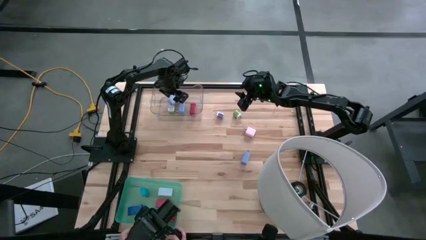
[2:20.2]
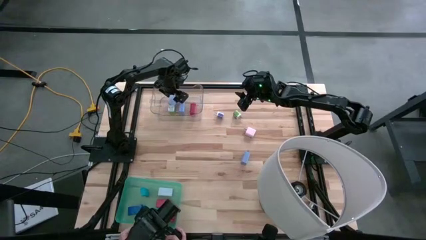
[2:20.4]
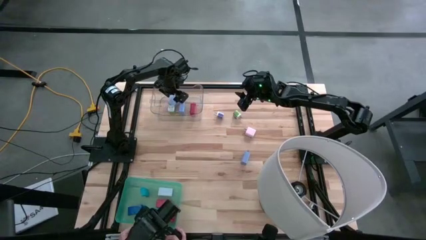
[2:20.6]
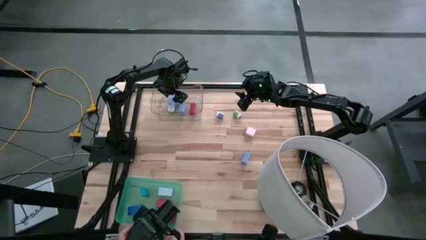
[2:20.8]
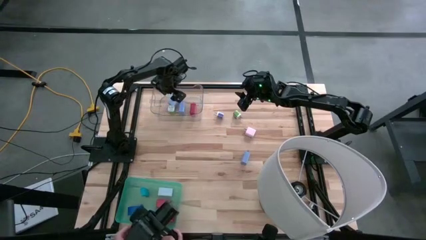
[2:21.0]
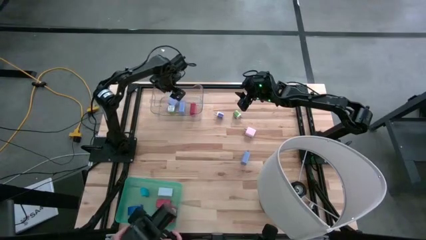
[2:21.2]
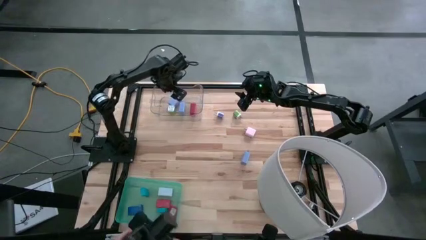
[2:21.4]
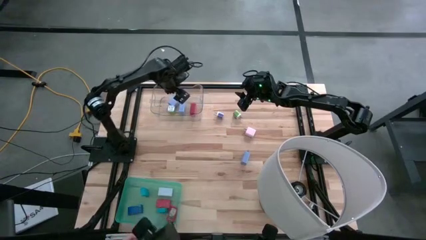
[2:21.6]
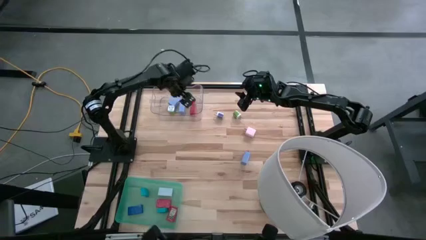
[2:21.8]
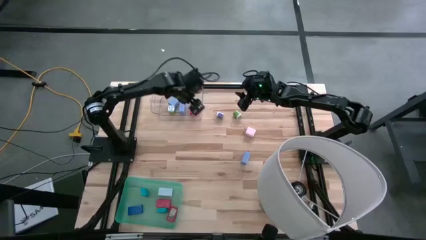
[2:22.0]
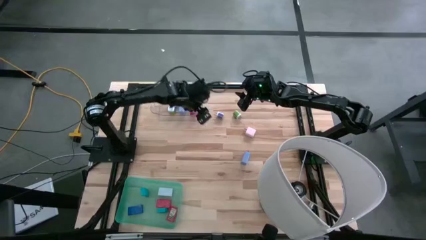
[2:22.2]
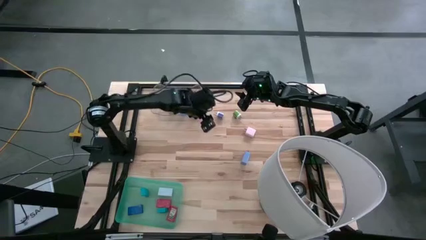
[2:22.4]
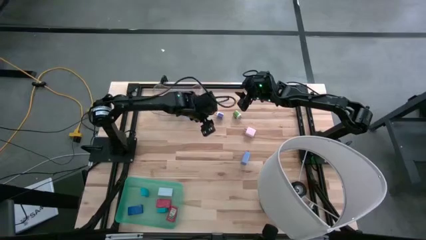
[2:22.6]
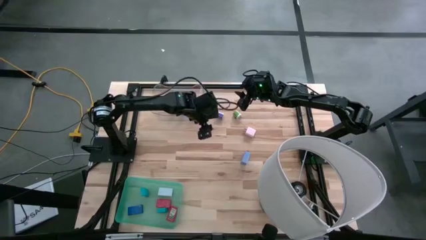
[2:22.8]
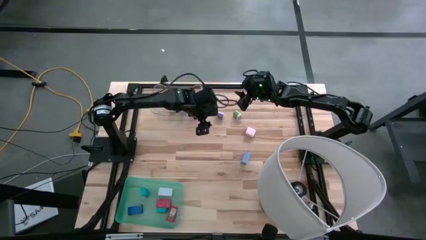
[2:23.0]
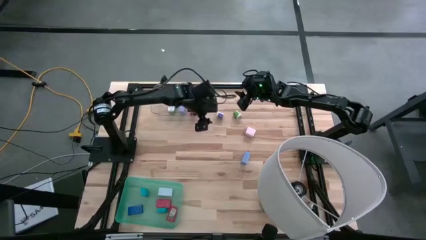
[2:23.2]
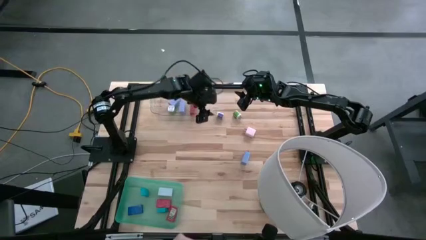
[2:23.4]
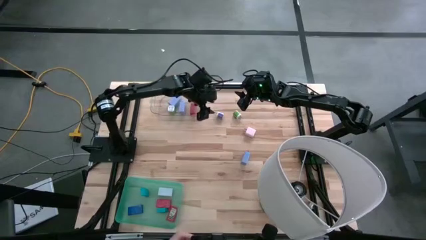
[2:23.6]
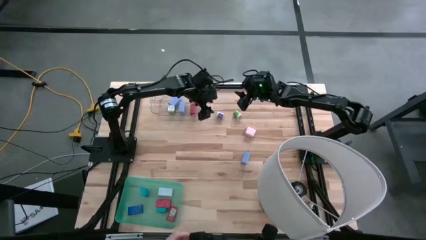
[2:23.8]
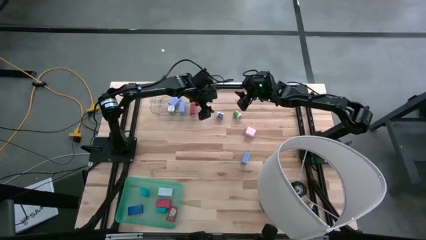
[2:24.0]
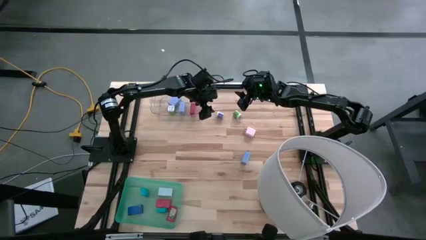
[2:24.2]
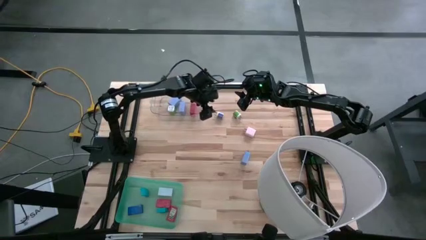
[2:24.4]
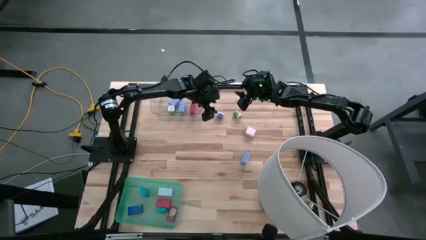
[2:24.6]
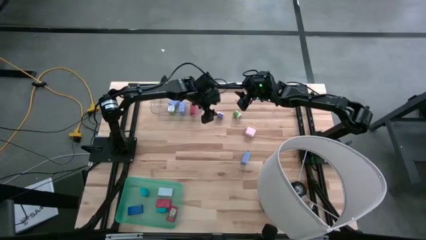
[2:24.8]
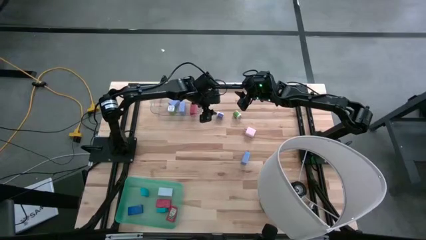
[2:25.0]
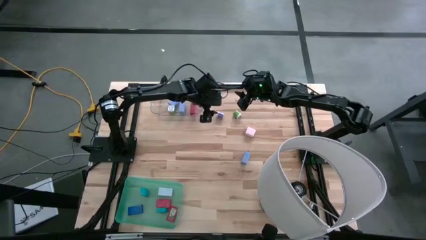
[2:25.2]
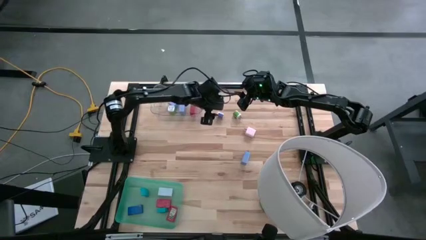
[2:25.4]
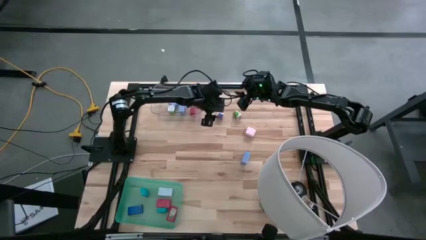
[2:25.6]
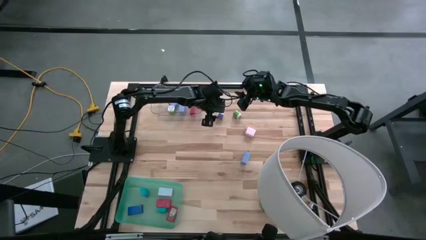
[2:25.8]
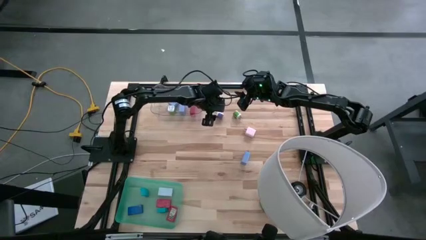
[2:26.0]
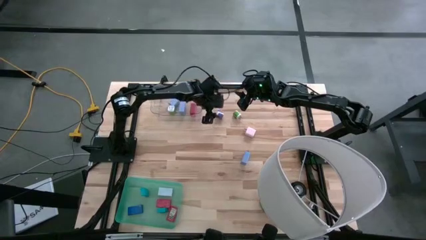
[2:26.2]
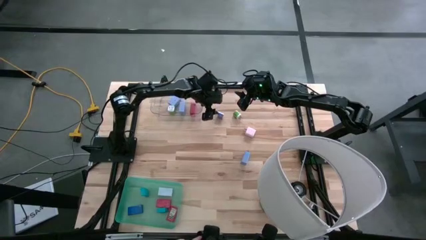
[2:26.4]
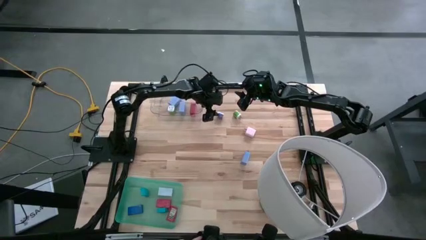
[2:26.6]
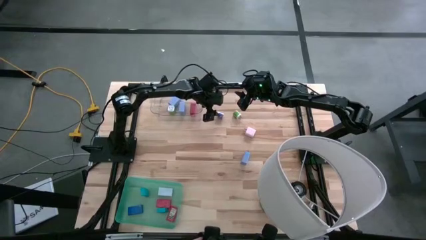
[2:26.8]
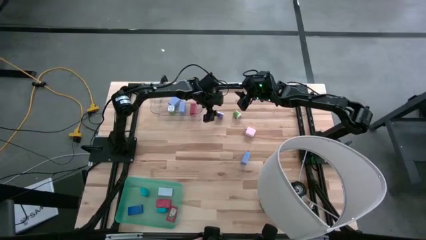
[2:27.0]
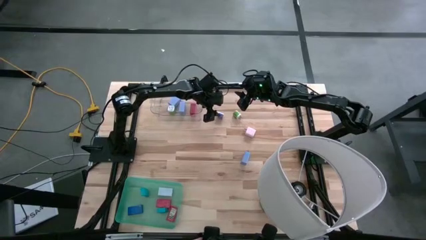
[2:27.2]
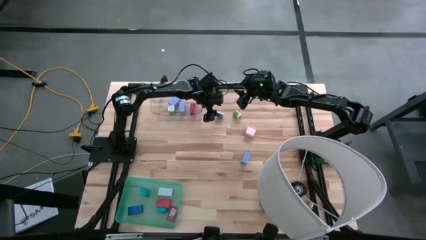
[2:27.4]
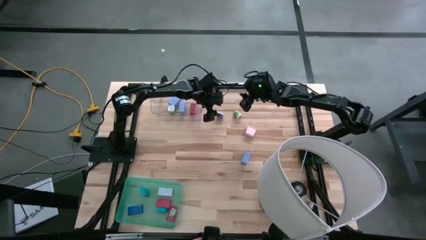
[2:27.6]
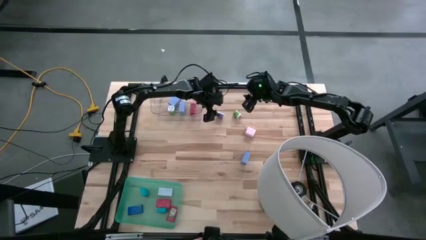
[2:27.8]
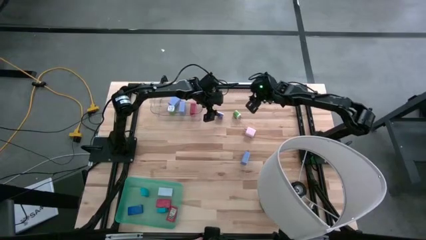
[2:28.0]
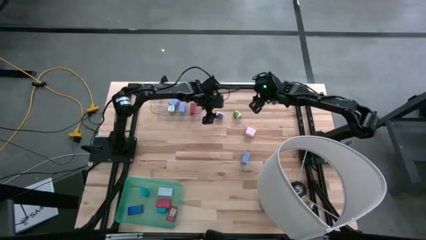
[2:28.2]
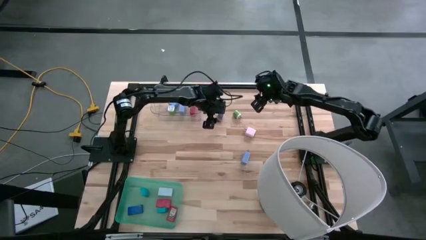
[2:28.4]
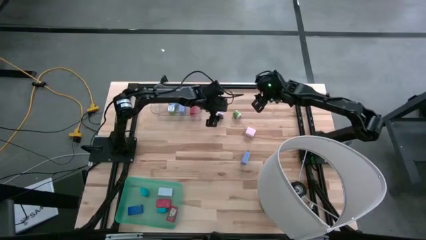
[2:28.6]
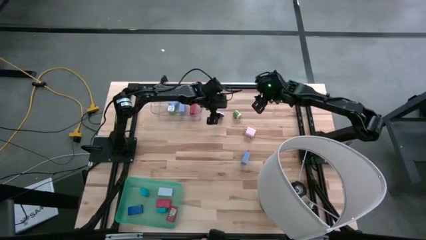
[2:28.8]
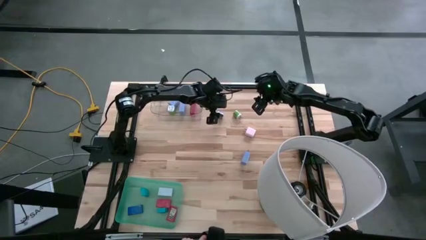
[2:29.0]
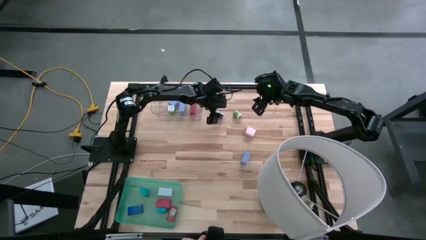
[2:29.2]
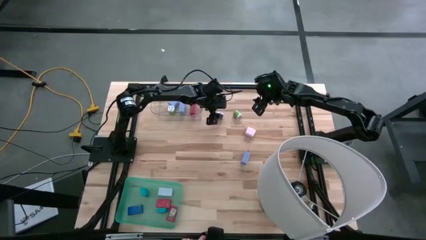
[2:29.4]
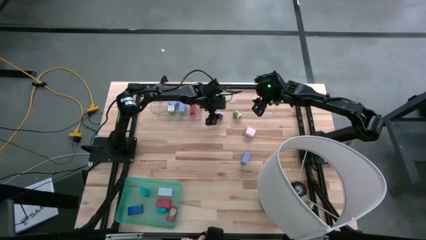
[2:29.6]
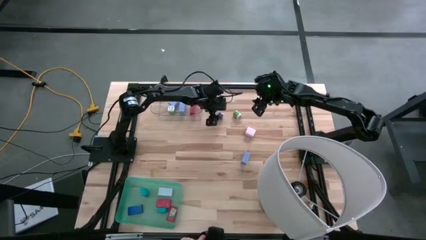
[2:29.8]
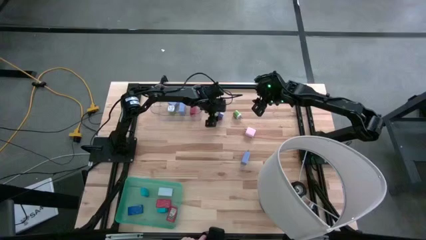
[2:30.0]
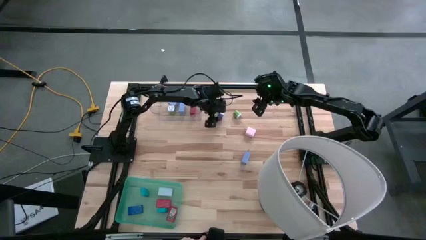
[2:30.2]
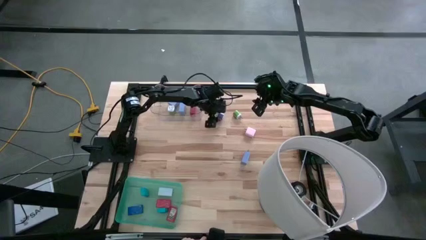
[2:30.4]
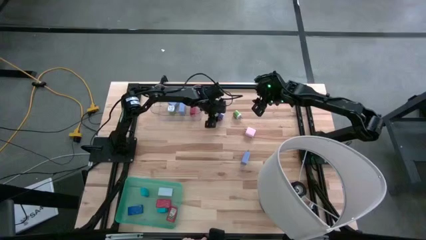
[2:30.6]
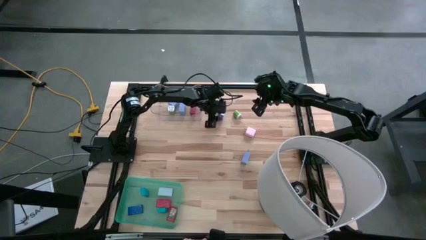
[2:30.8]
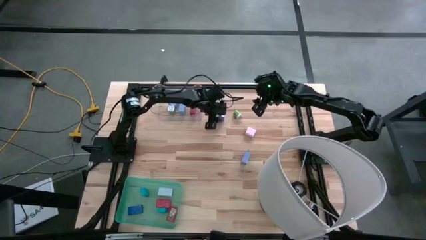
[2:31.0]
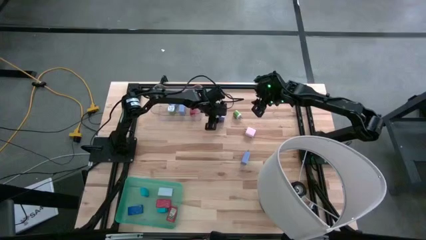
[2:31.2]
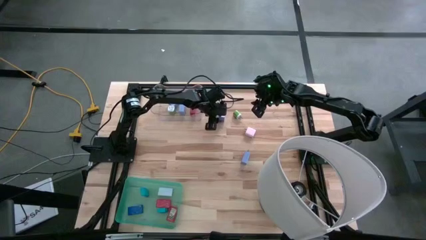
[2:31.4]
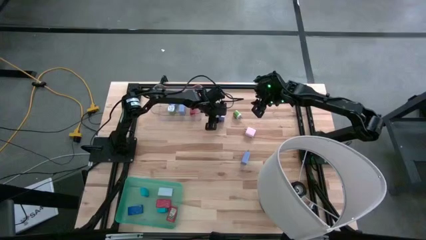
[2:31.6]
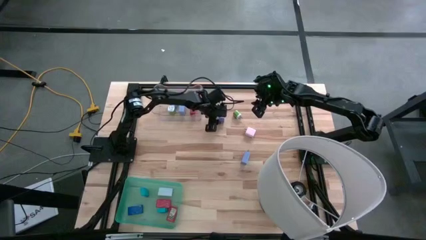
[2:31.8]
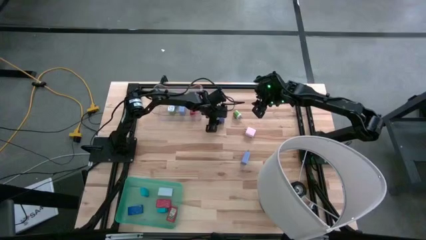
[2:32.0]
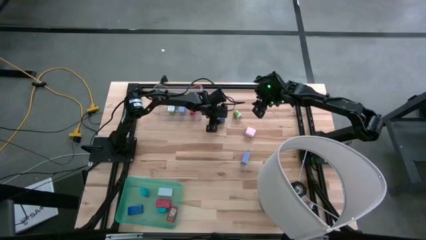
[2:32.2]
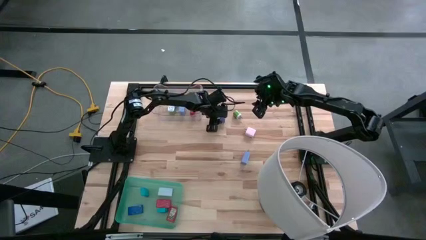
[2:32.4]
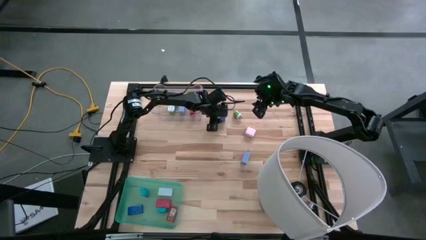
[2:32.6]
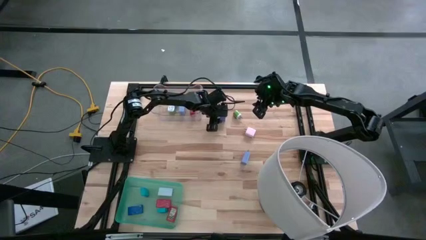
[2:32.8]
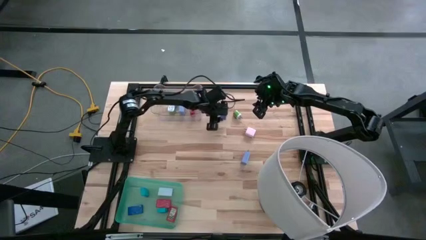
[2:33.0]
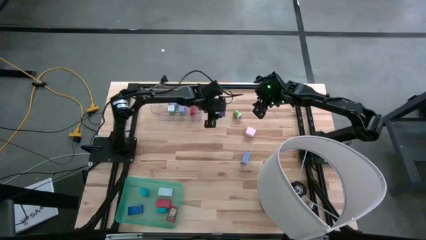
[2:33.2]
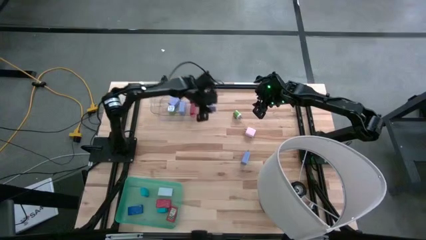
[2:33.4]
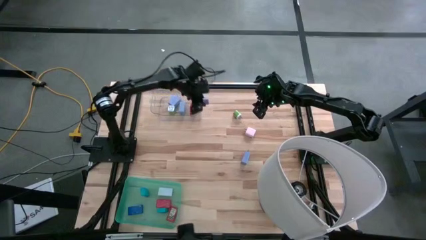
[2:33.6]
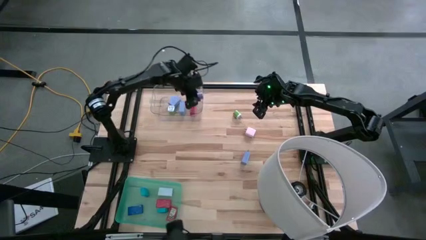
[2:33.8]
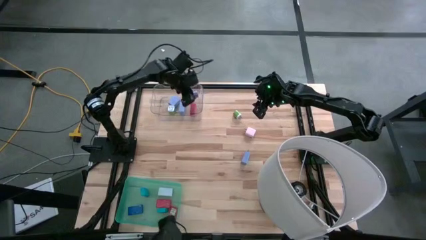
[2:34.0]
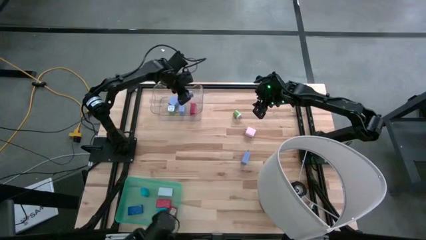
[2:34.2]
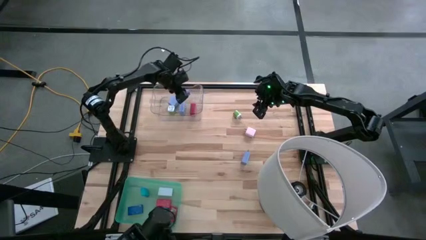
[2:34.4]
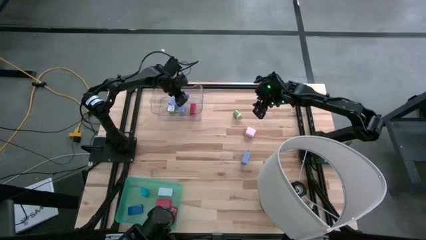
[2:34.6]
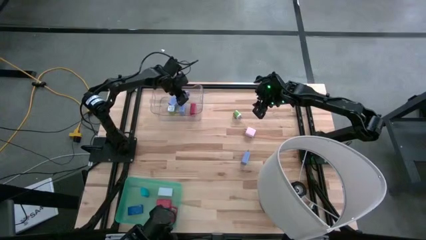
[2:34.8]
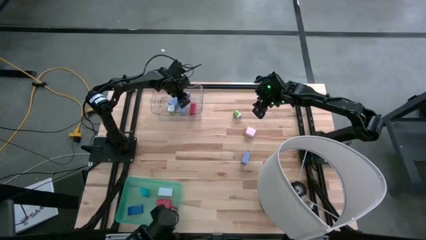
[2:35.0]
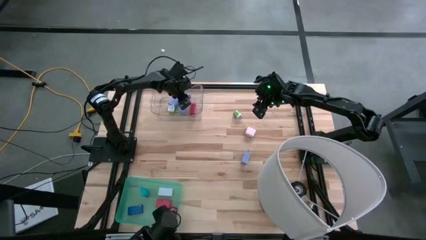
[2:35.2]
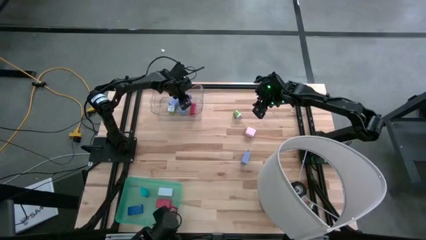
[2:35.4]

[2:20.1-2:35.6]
Task: Pick & Place Office items
Put the blue charger adapter into the transparent bin
